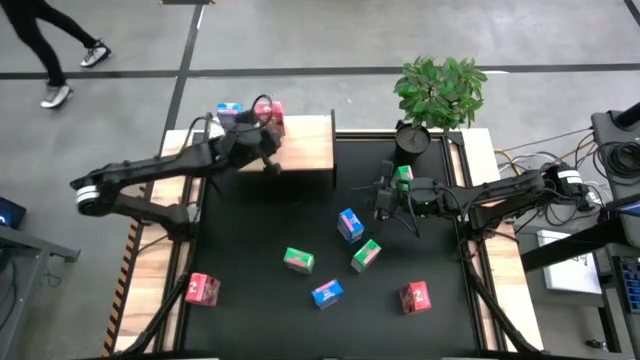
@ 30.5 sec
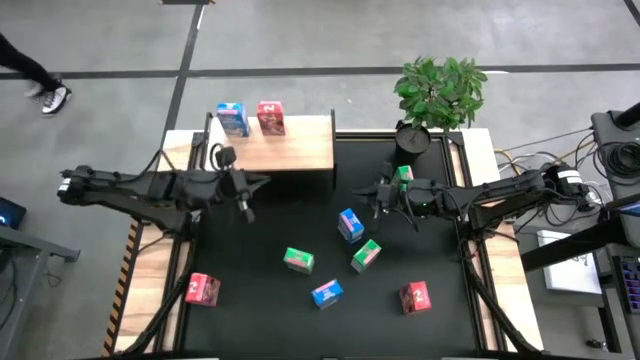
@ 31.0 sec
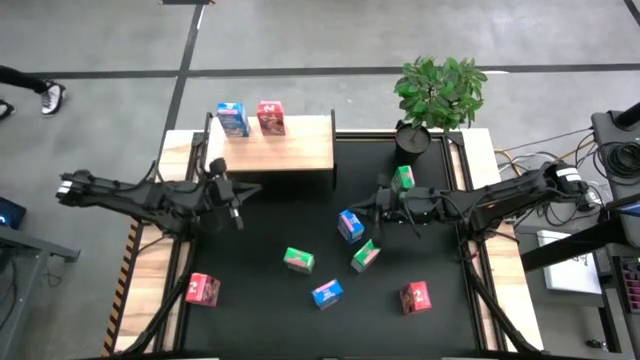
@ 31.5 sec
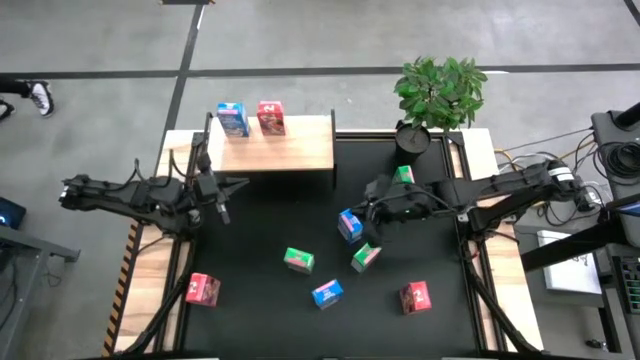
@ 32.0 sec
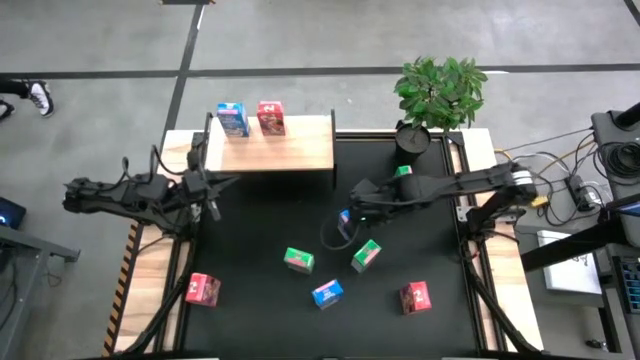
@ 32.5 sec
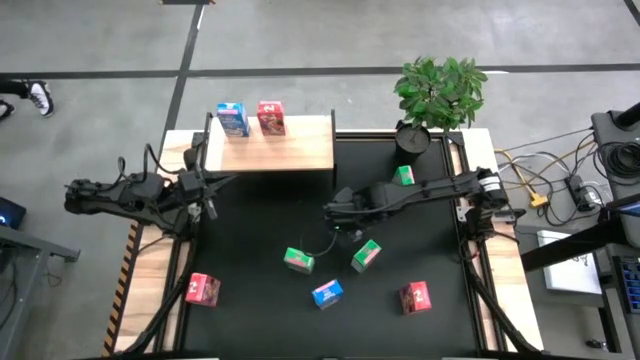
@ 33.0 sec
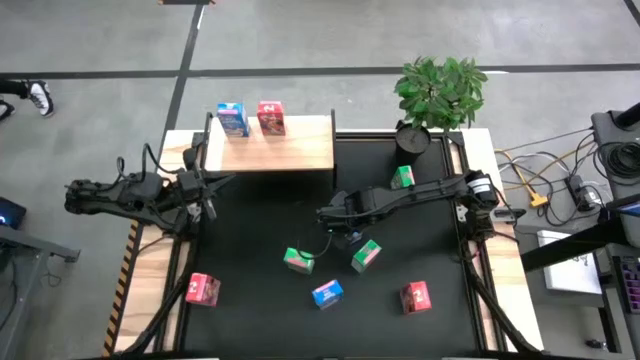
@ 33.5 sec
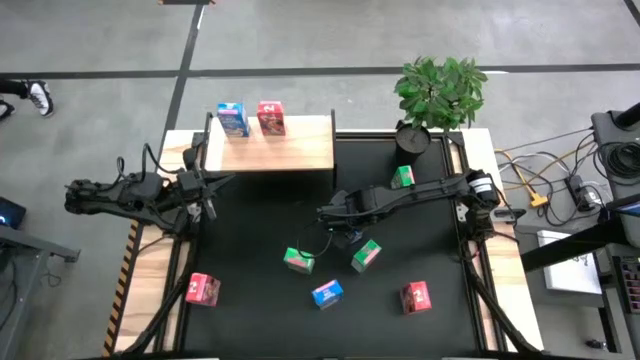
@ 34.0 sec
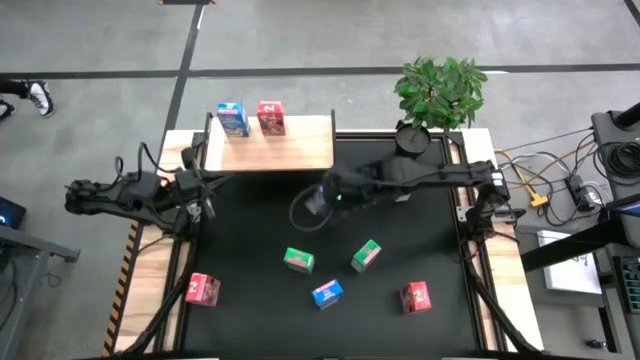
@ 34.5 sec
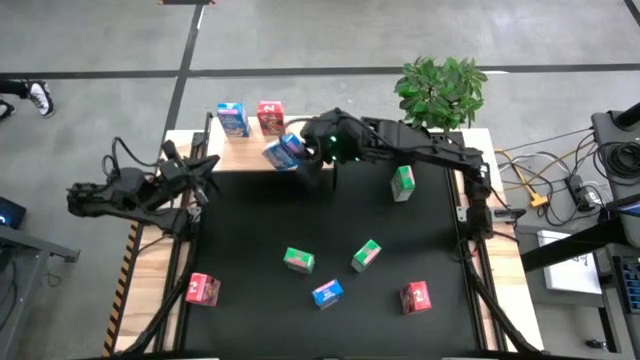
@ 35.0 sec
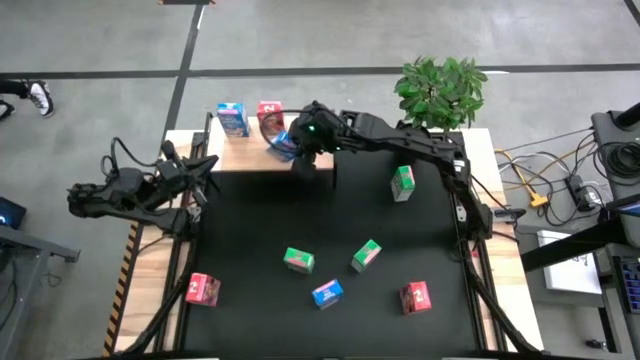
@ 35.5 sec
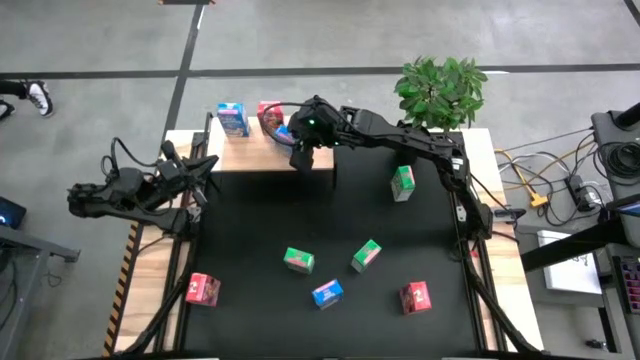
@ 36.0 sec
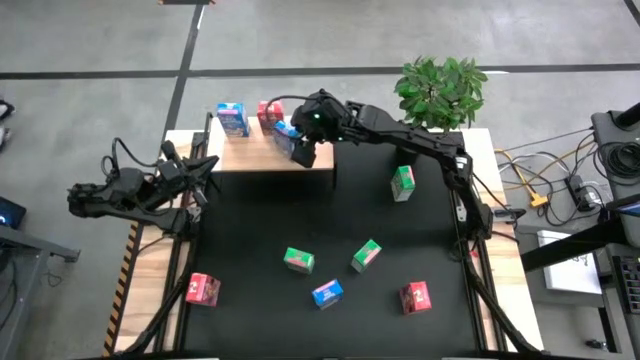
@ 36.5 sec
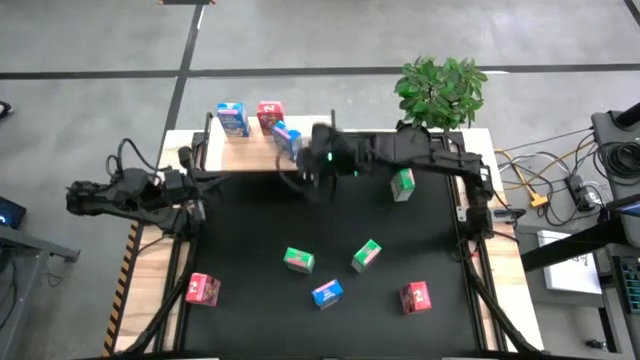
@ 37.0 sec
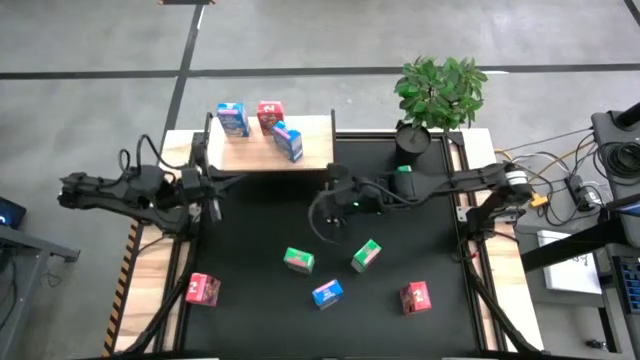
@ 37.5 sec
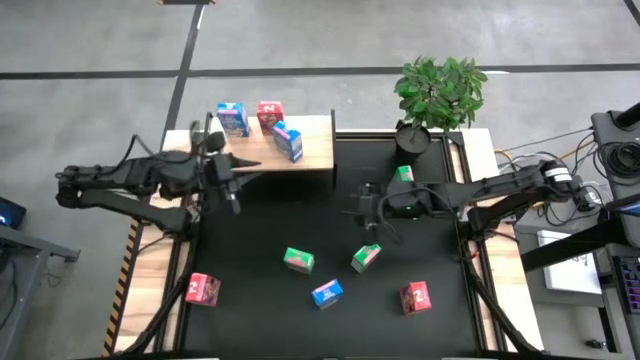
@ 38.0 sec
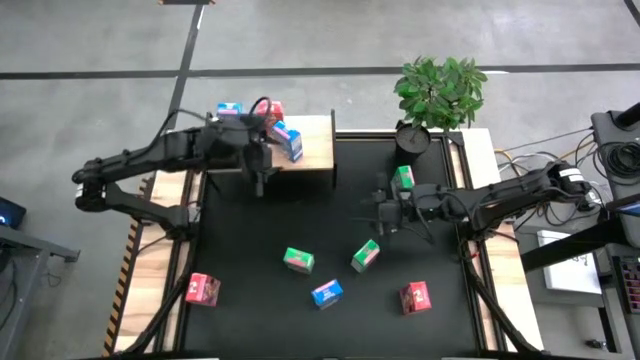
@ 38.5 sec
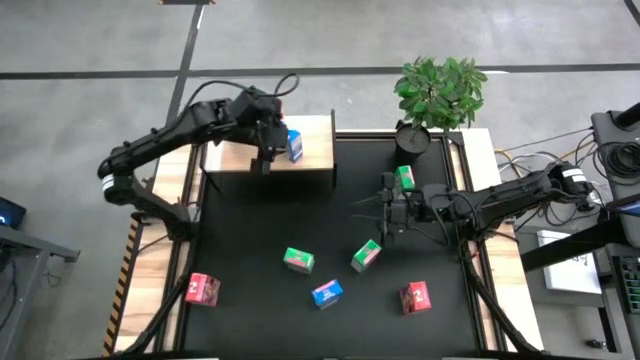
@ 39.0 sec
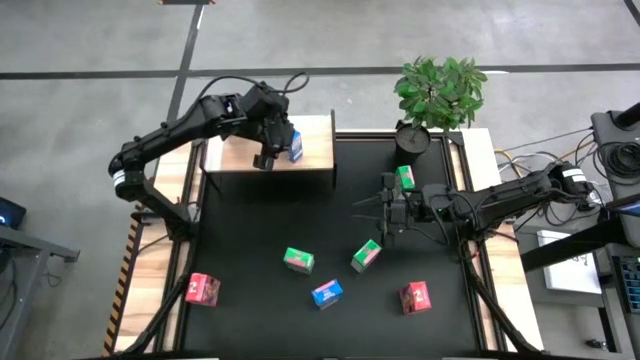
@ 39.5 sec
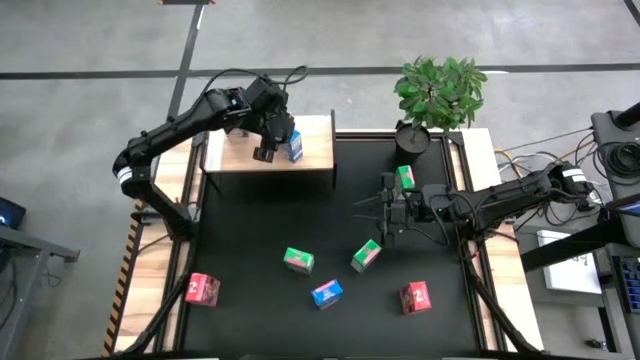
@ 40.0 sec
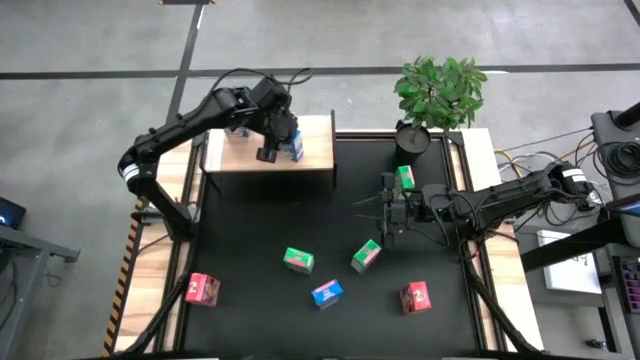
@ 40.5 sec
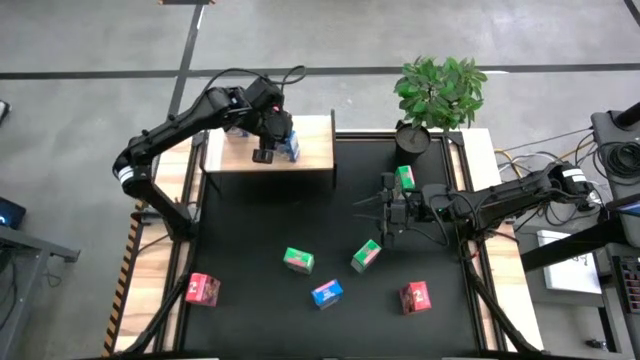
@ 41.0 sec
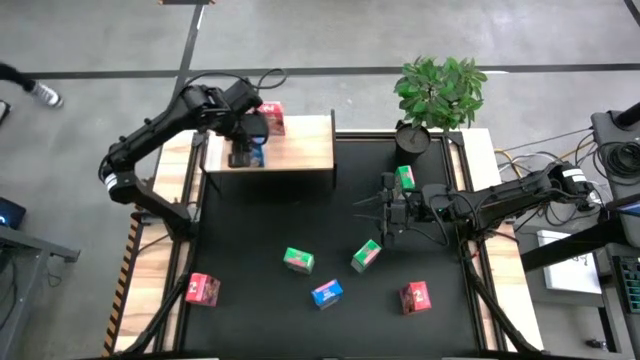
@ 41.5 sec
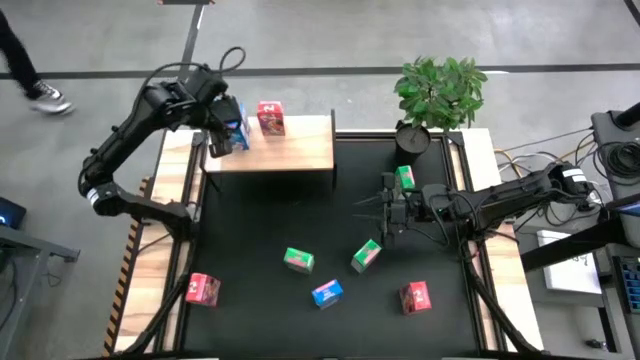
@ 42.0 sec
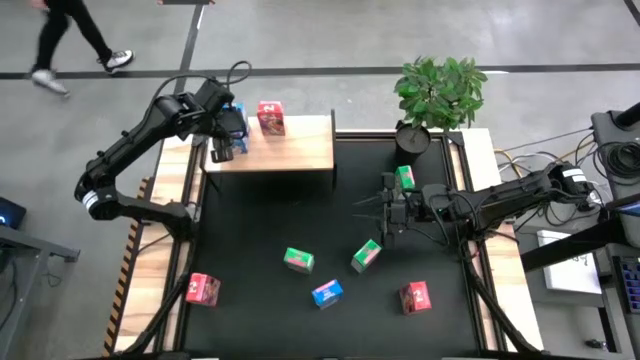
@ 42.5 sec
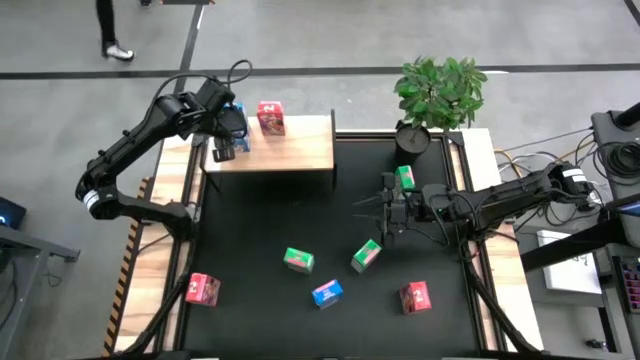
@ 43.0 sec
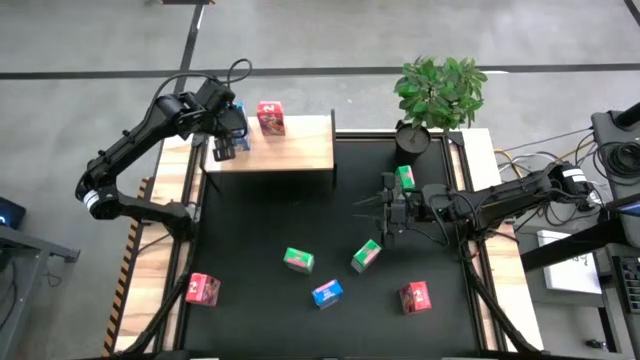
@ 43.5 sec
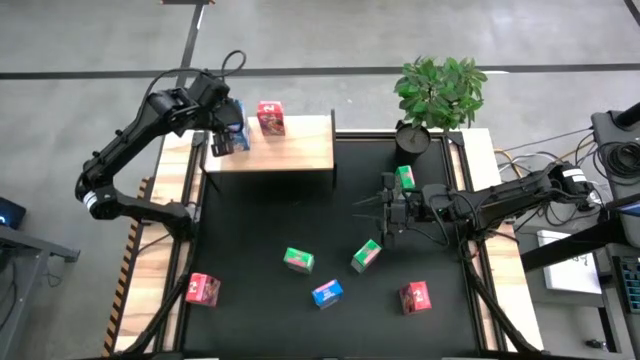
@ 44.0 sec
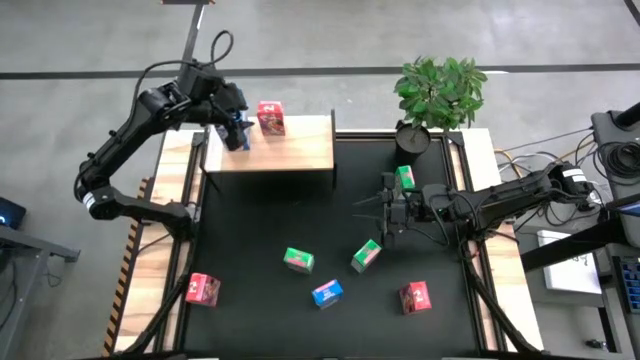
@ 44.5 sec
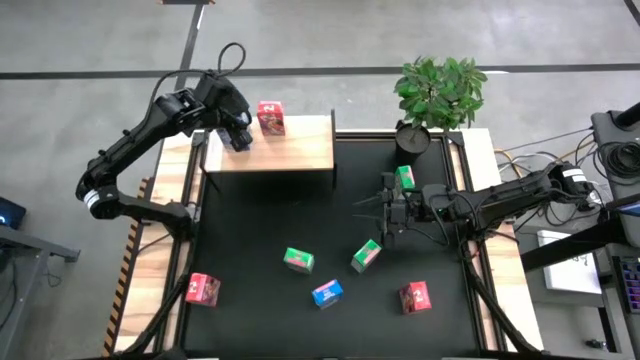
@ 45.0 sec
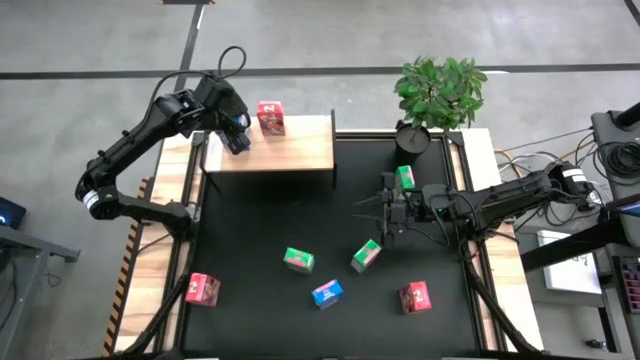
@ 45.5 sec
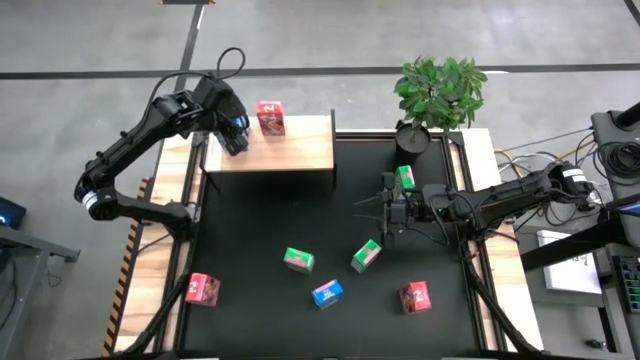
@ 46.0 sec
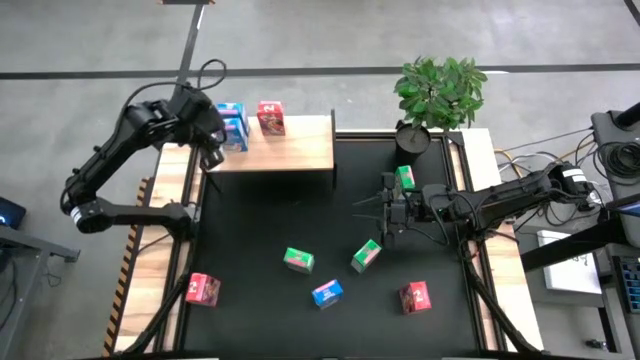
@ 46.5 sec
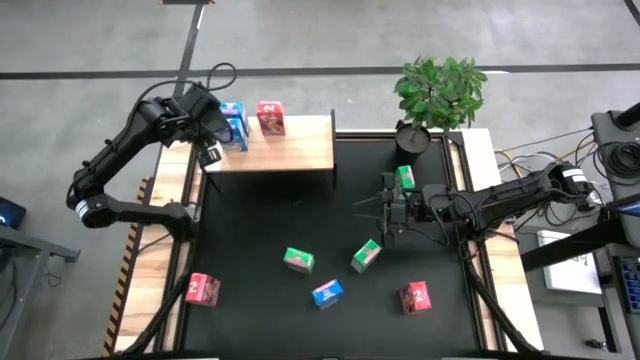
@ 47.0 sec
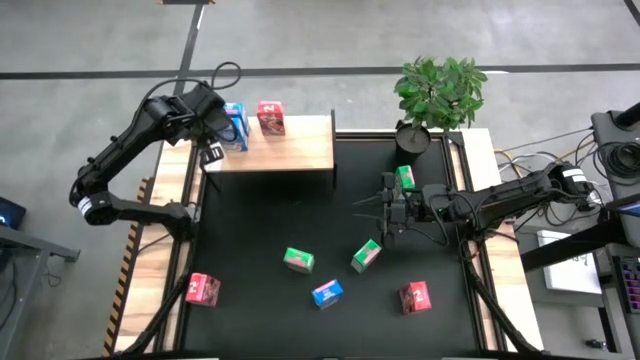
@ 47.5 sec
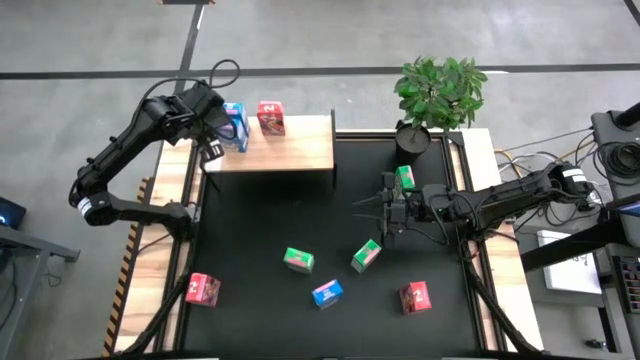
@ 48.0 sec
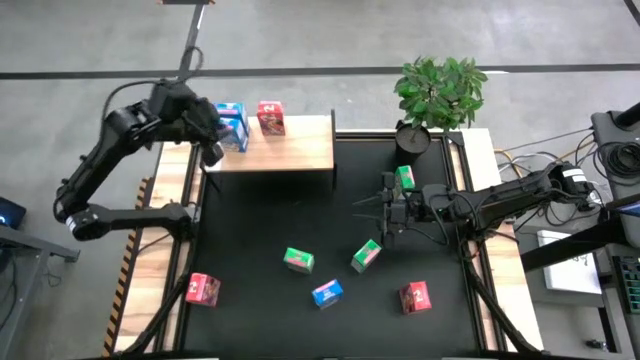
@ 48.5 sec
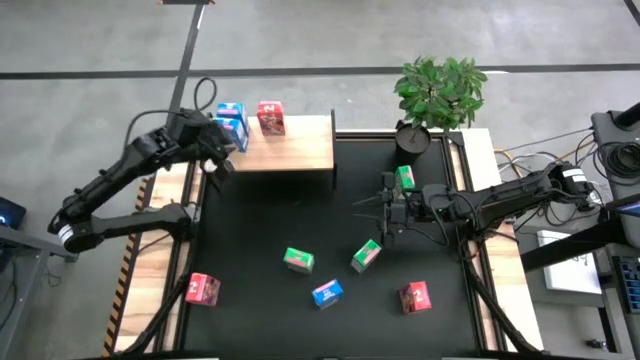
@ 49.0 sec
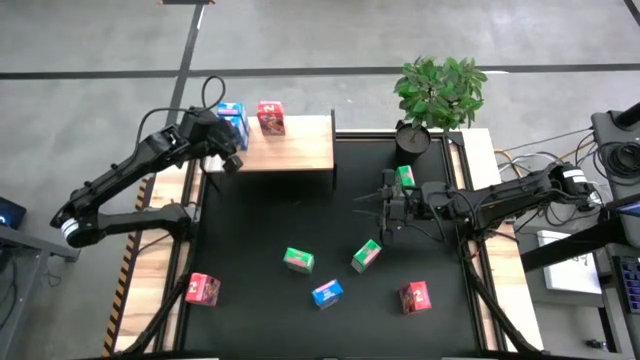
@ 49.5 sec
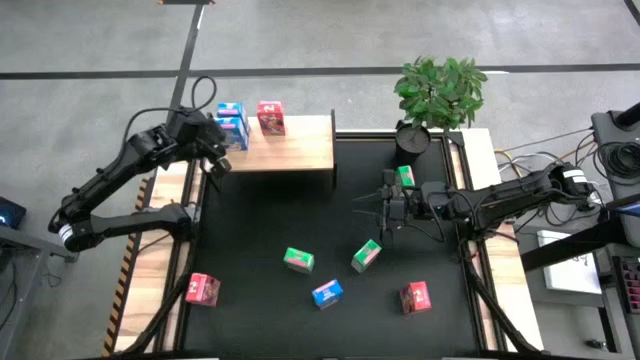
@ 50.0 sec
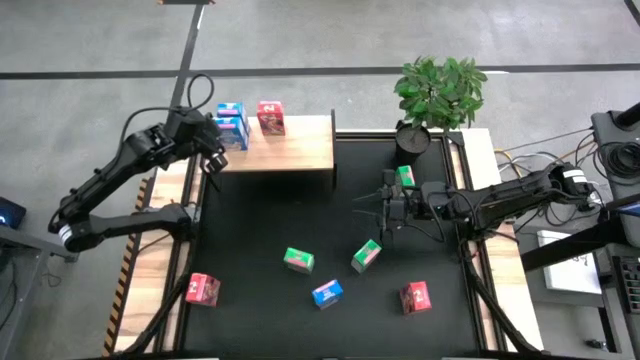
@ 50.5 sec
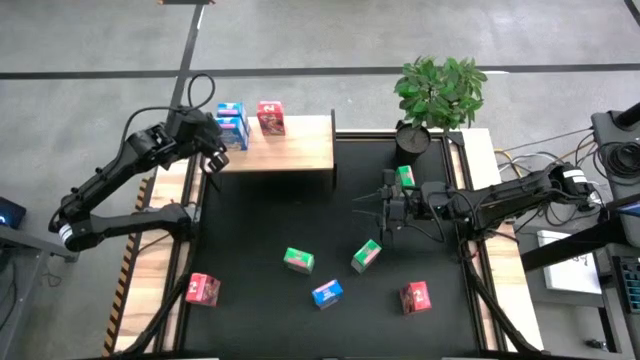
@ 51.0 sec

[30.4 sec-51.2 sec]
Task: Stack cereal on shelf
Put the top blue cereal box on the shelf aligned with the other blue cereal box
